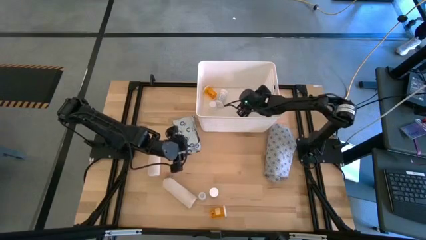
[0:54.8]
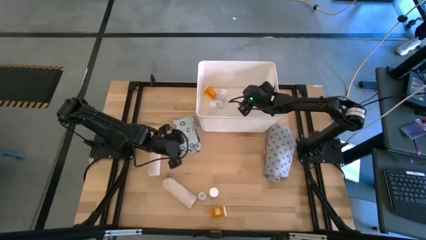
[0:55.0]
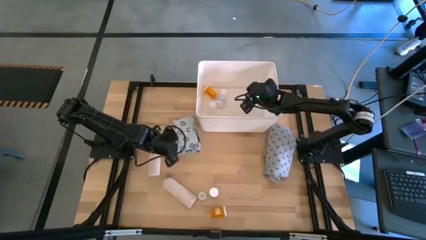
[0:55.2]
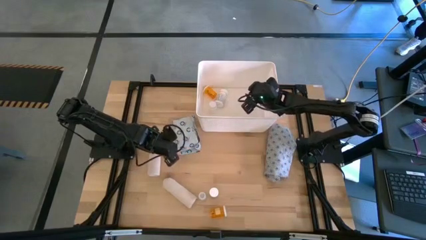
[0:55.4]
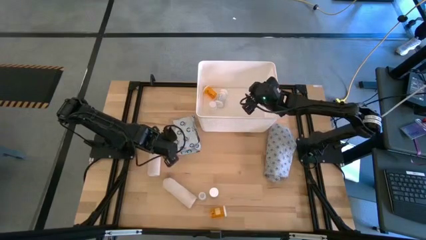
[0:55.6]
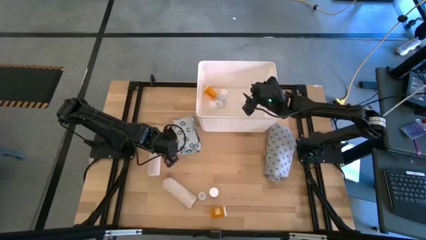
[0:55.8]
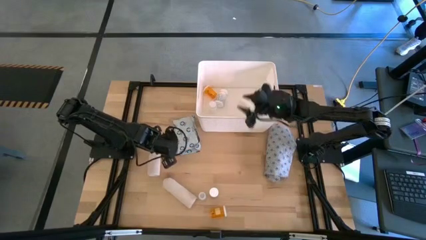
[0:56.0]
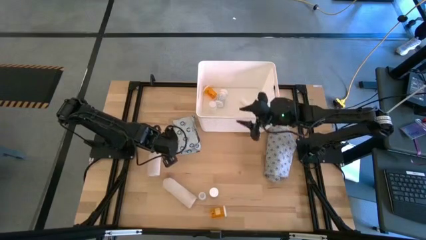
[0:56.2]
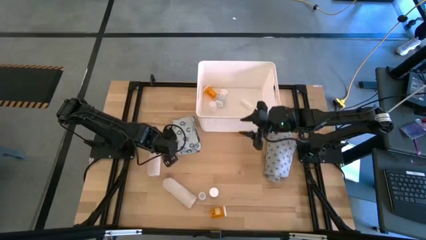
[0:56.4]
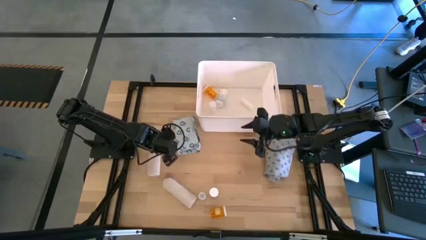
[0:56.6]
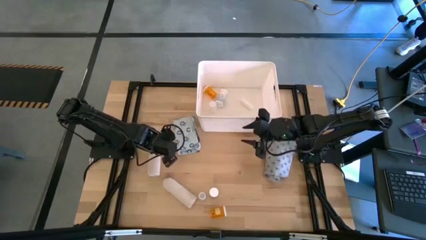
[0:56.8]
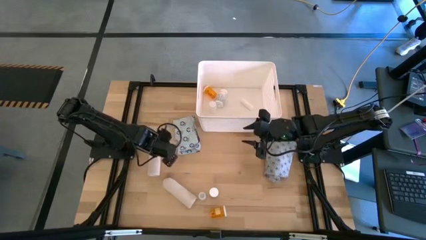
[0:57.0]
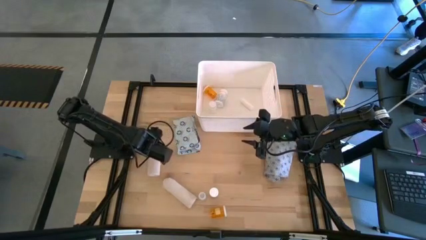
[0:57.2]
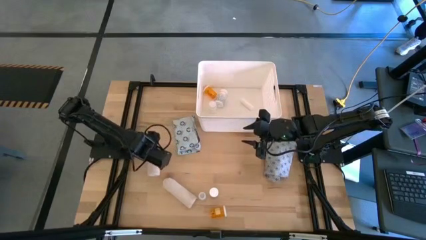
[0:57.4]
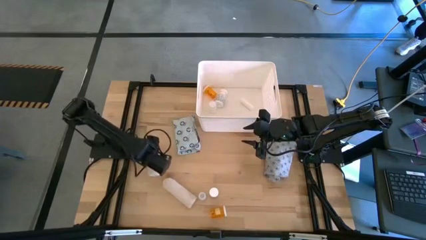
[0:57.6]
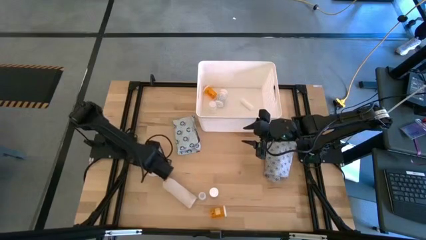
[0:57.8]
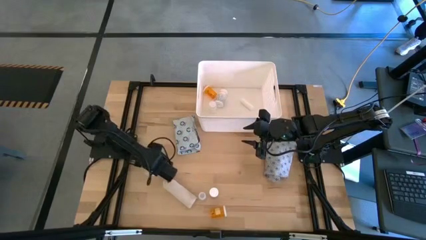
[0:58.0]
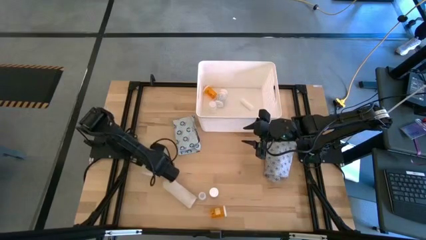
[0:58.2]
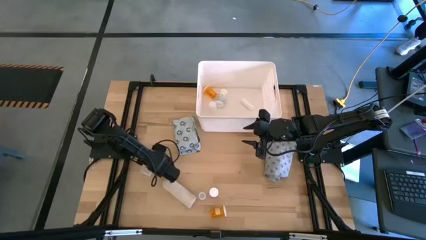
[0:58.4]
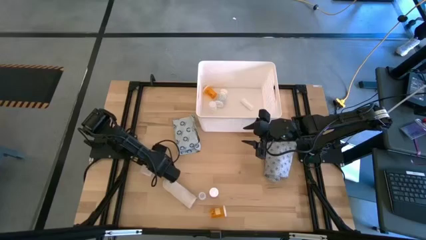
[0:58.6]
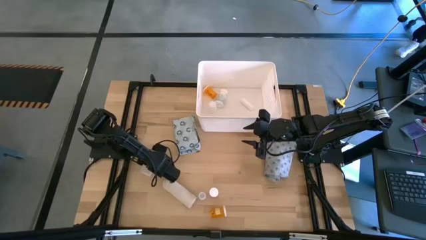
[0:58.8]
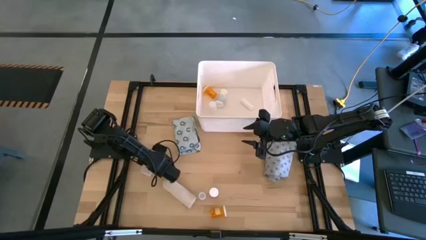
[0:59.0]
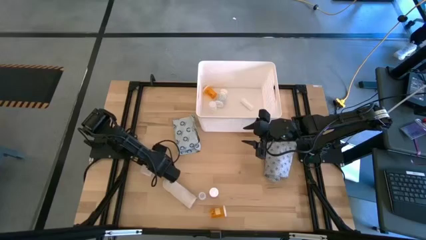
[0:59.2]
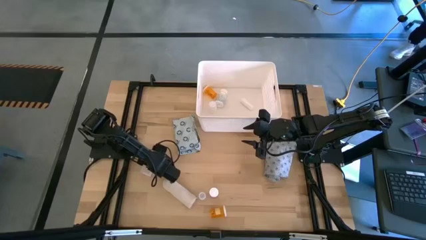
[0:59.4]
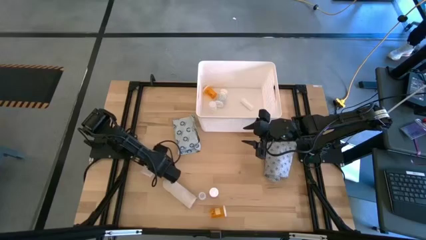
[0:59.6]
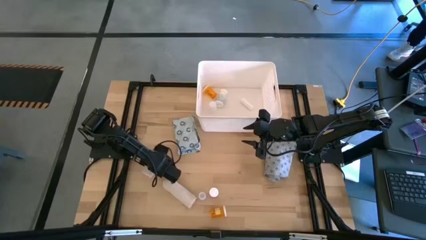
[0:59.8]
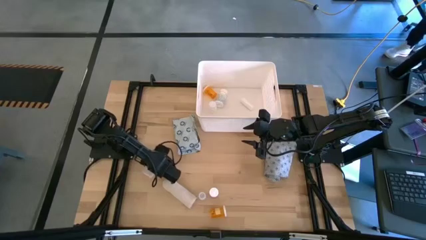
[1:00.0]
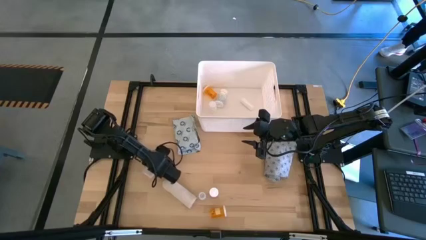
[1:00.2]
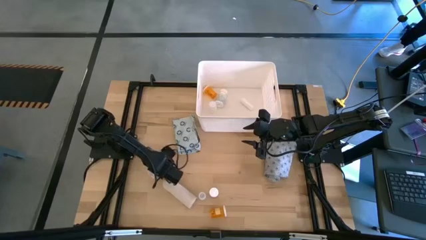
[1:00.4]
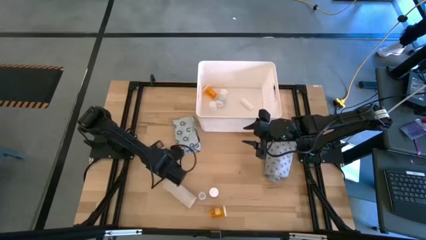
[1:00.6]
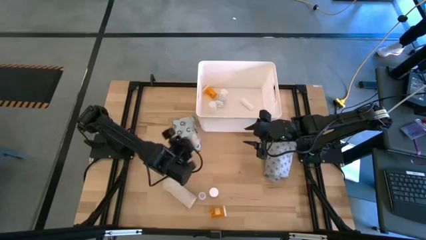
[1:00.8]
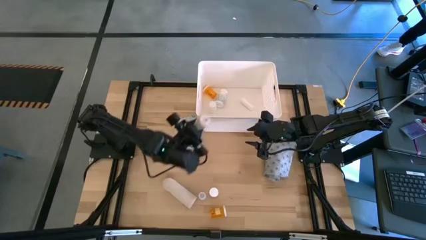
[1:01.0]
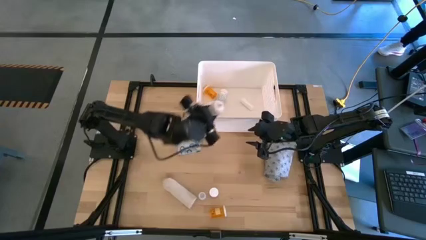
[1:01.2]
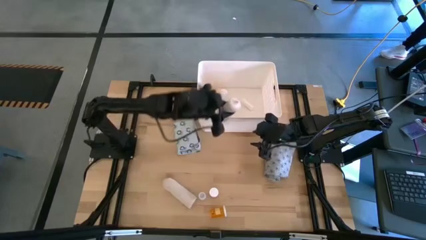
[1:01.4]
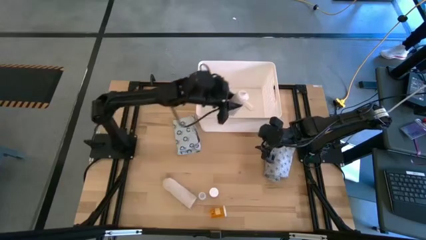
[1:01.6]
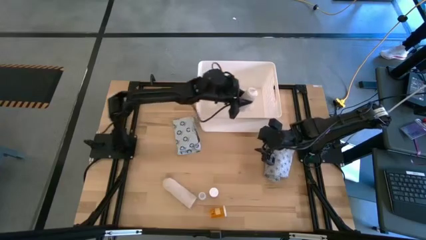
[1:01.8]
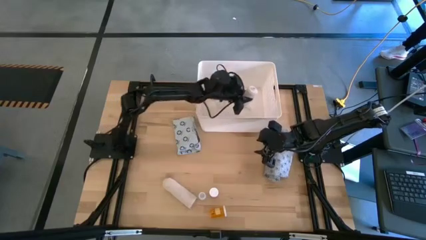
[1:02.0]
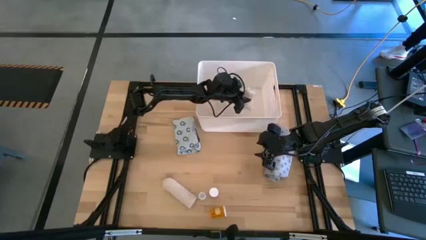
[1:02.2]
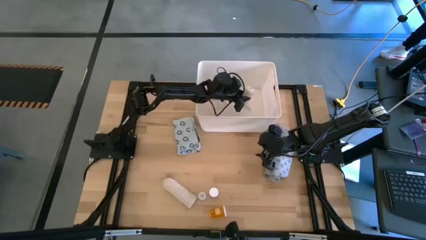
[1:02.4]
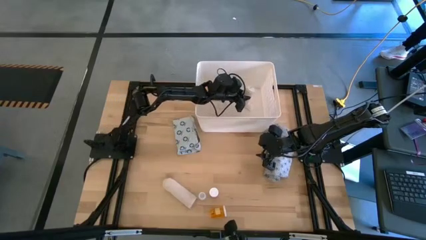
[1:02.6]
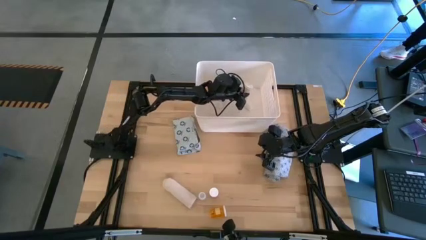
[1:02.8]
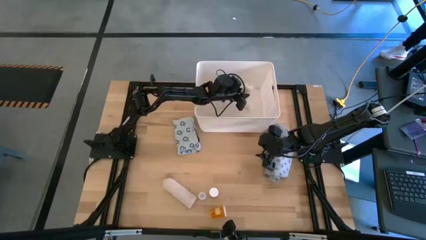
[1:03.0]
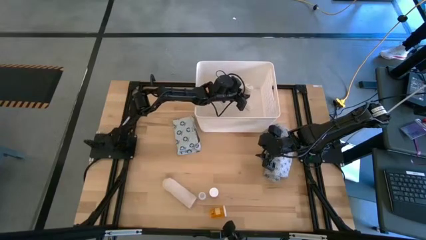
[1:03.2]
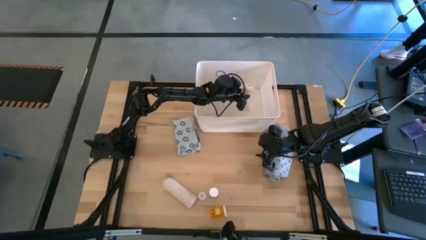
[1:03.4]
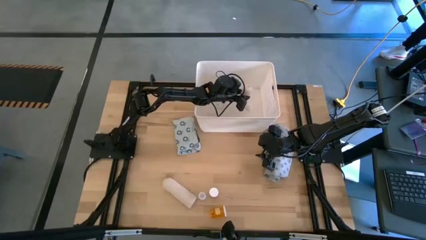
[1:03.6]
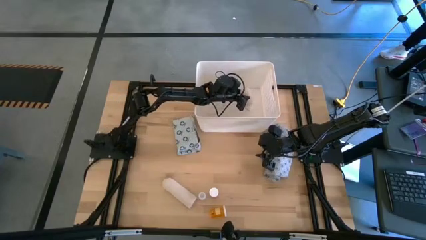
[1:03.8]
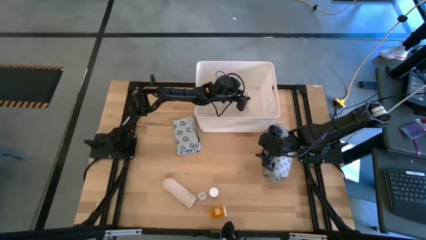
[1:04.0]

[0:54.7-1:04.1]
Task: Pick & place medical supplies in basket/bin
Put the top brown bandage into the white bin

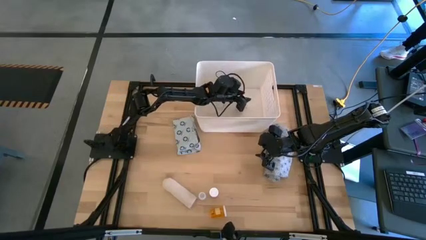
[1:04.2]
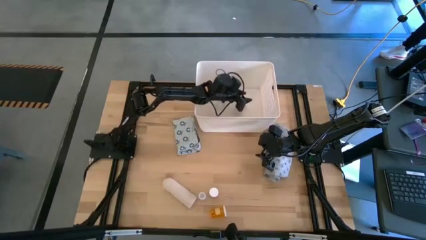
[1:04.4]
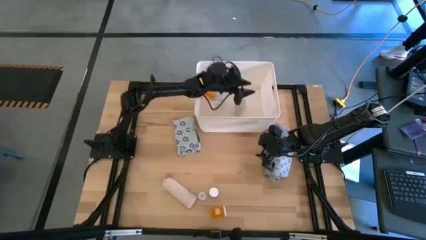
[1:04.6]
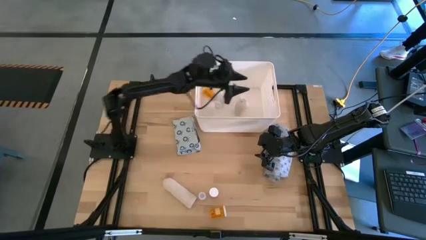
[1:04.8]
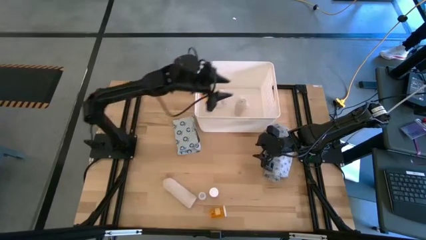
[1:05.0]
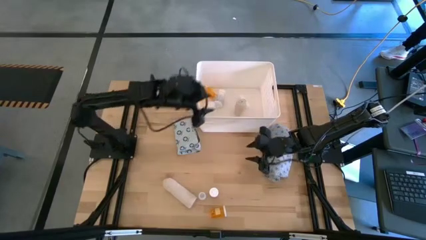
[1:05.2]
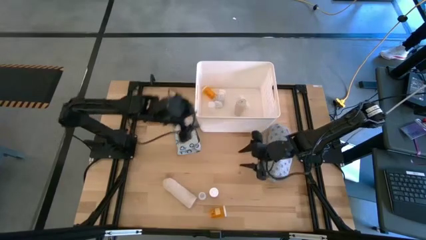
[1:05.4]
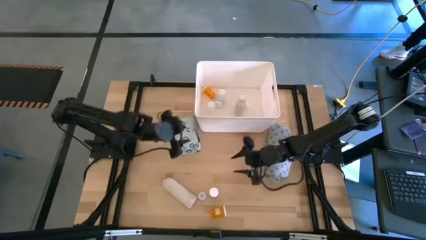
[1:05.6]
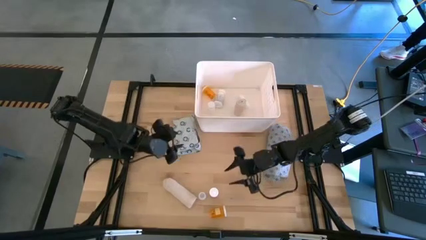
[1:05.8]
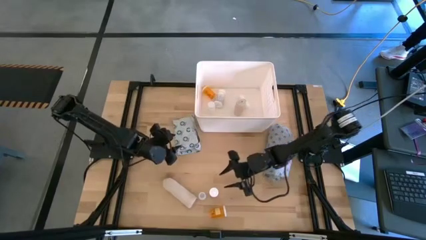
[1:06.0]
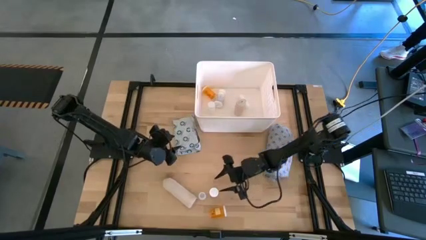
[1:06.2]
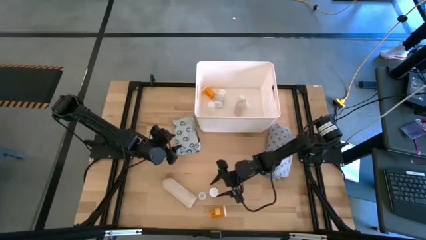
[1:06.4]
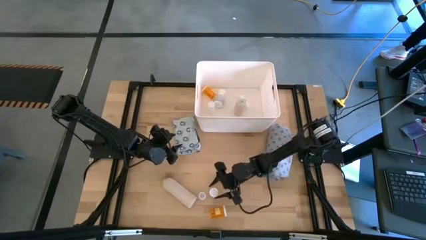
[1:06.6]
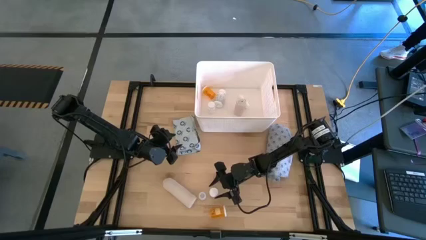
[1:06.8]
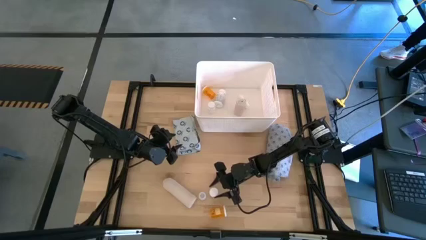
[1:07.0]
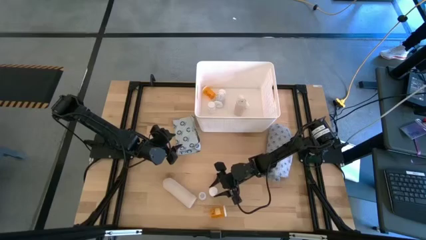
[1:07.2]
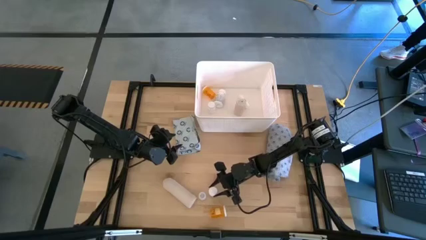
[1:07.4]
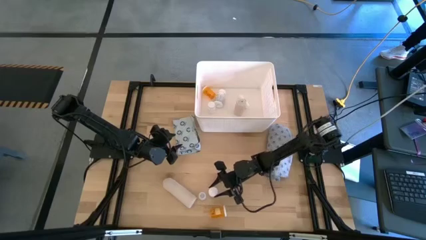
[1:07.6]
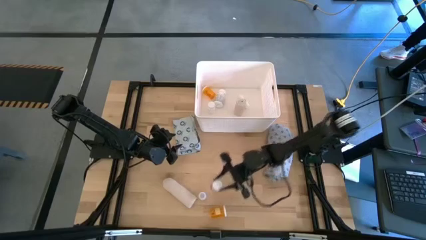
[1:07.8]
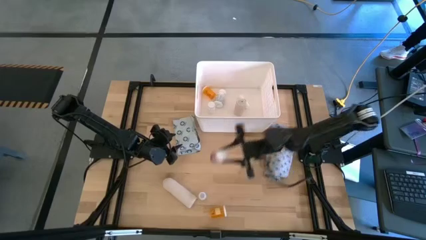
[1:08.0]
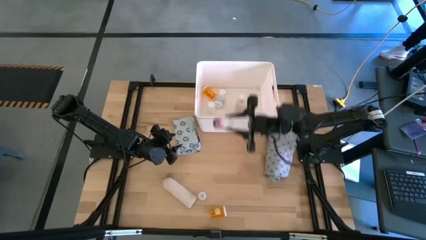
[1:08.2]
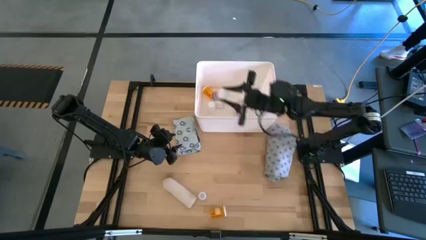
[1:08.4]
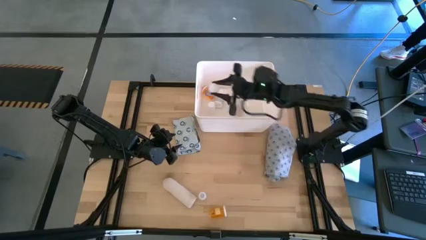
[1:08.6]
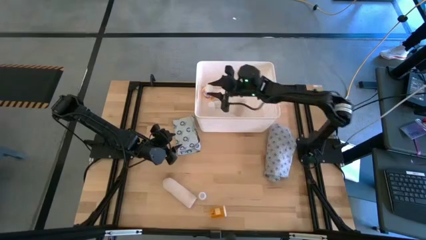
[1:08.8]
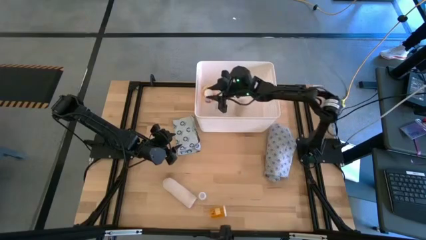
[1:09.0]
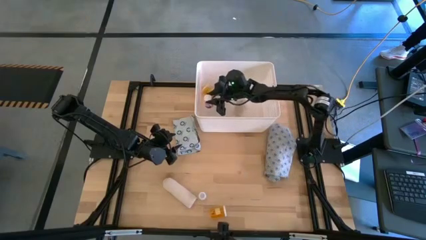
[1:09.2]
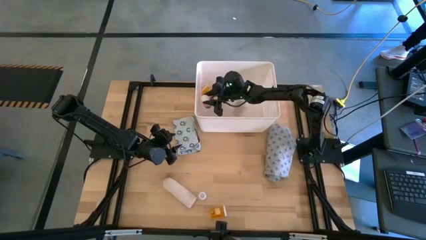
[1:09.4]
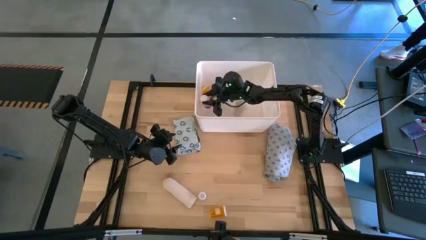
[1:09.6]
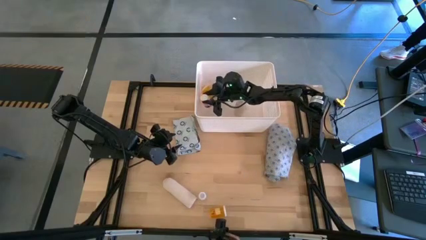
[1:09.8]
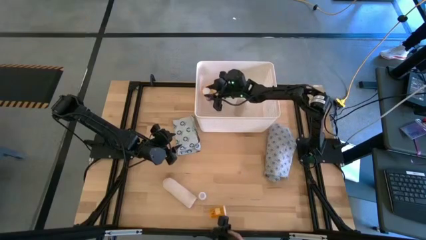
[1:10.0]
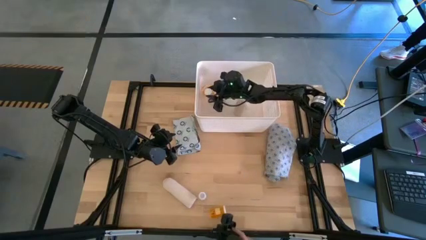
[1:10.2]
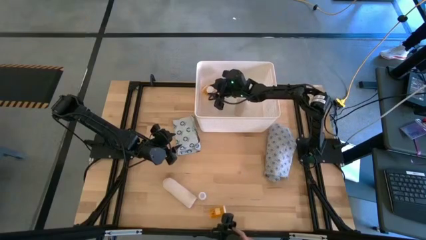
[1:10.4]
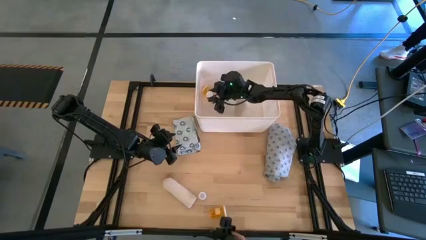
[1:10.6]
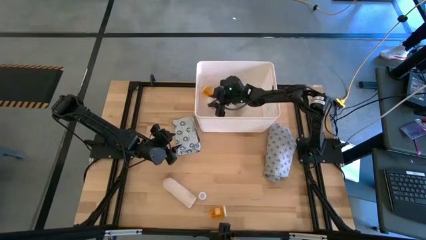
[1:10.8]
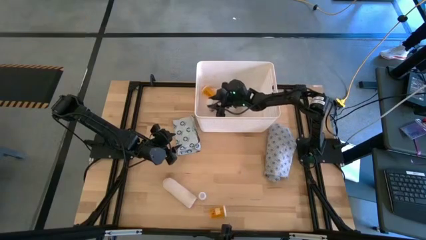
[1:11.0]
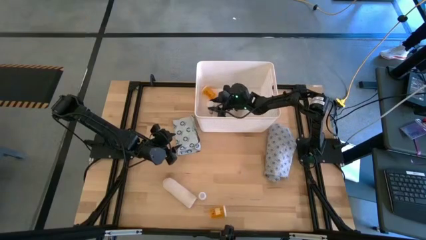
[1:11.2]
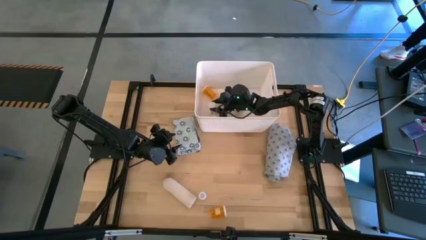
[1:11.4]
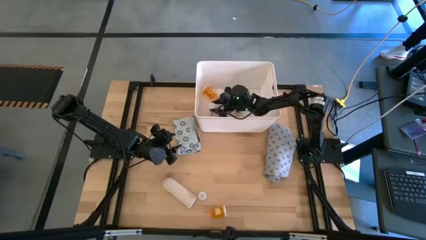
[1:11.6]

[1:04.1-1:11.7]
Put the pink pill bottle into the white bin
